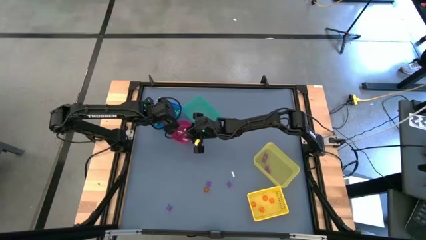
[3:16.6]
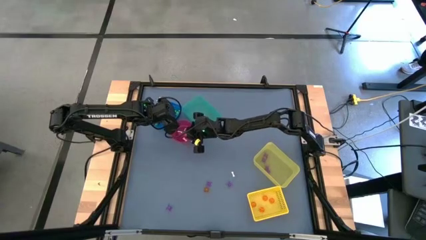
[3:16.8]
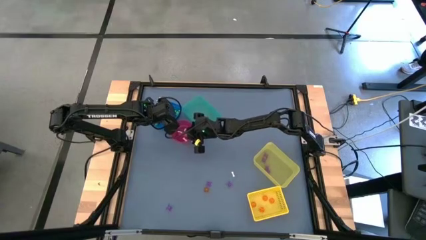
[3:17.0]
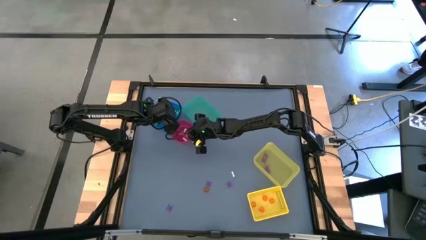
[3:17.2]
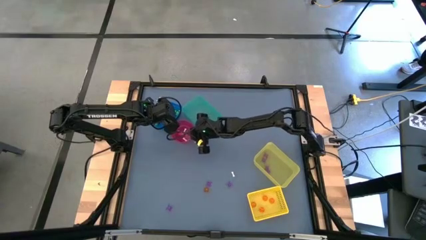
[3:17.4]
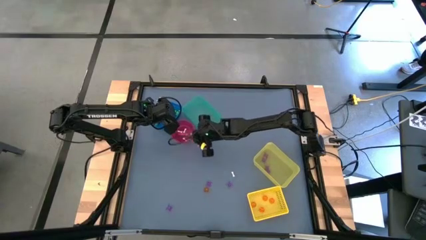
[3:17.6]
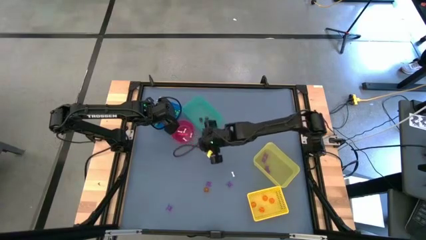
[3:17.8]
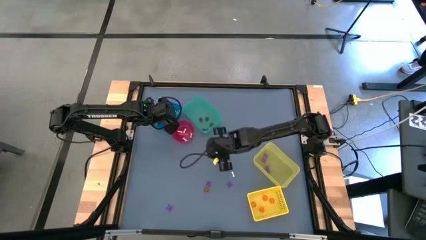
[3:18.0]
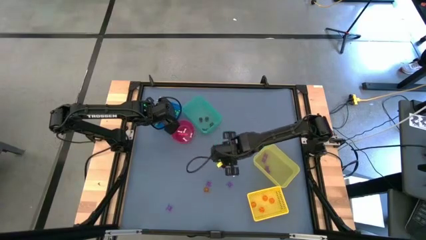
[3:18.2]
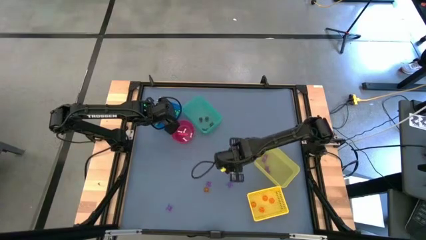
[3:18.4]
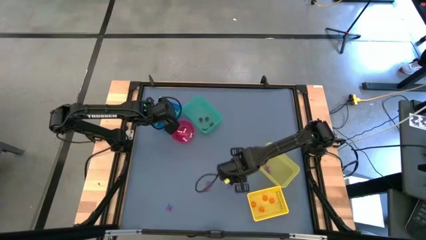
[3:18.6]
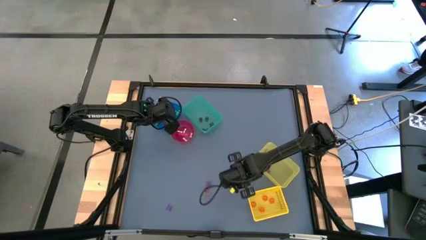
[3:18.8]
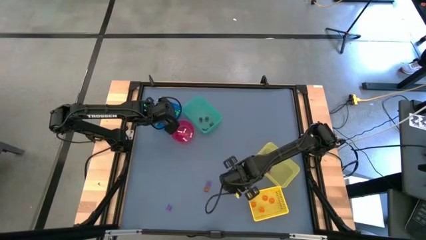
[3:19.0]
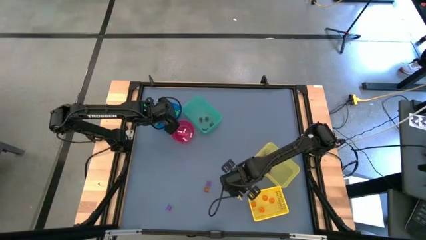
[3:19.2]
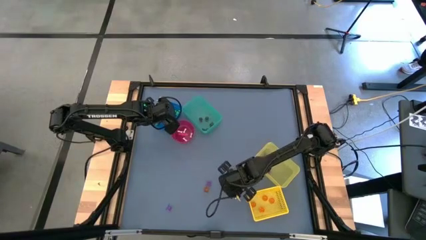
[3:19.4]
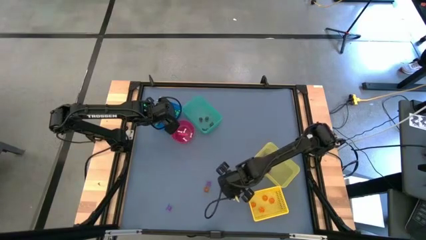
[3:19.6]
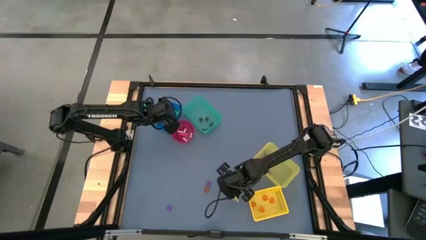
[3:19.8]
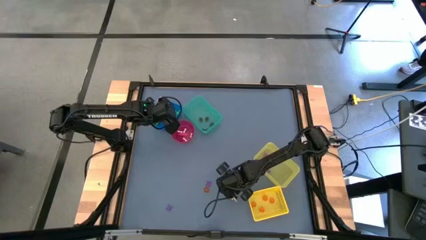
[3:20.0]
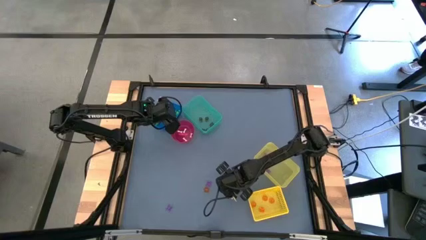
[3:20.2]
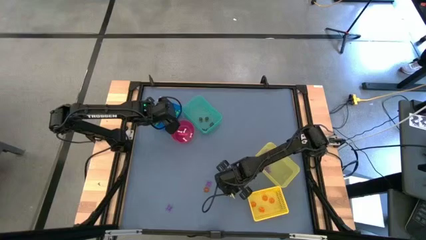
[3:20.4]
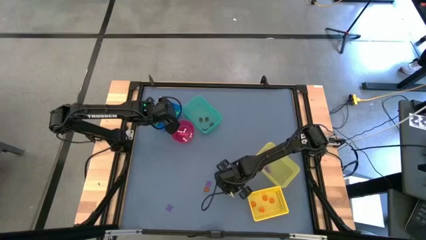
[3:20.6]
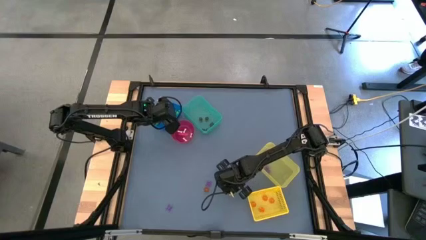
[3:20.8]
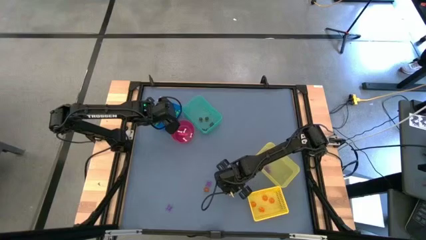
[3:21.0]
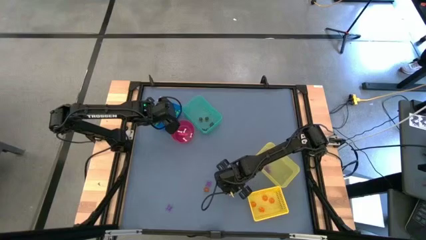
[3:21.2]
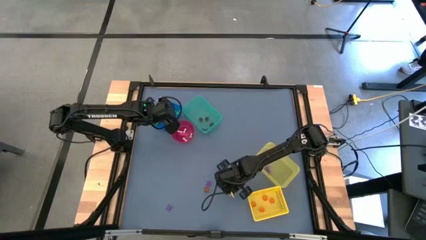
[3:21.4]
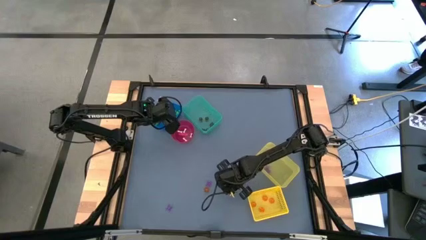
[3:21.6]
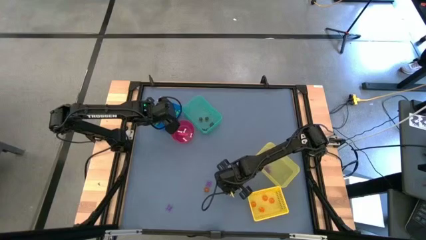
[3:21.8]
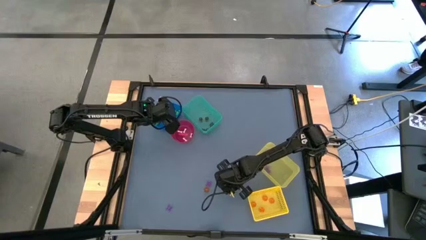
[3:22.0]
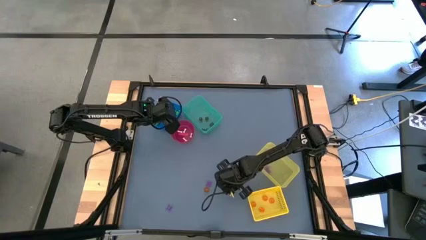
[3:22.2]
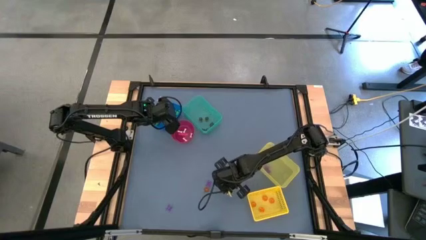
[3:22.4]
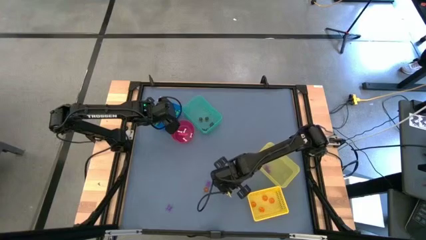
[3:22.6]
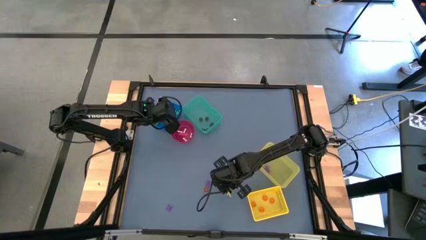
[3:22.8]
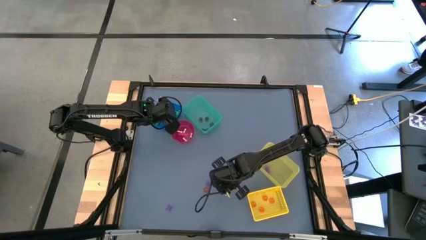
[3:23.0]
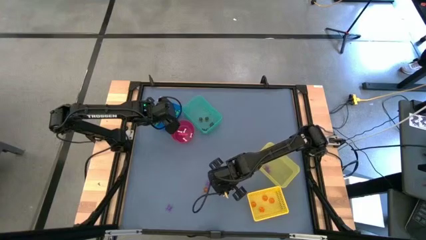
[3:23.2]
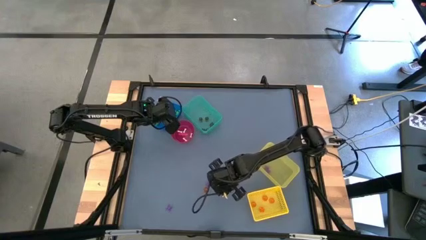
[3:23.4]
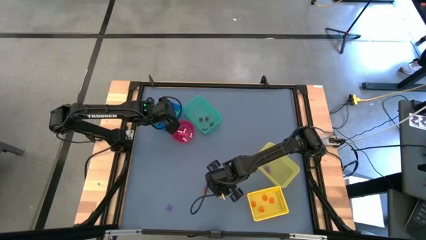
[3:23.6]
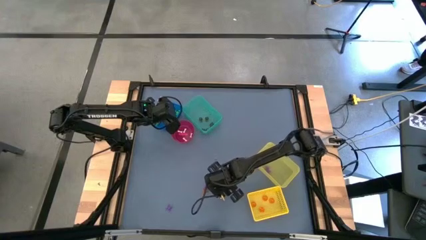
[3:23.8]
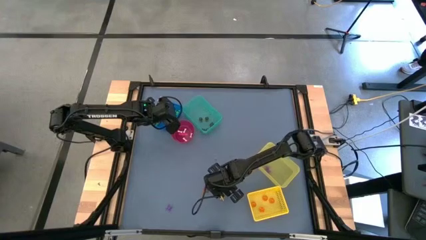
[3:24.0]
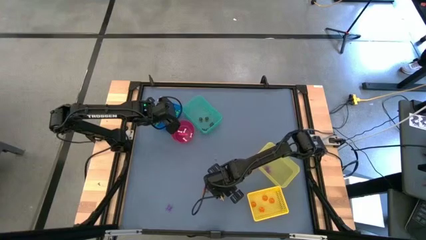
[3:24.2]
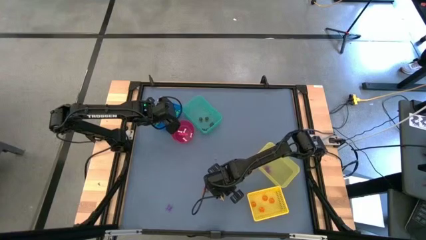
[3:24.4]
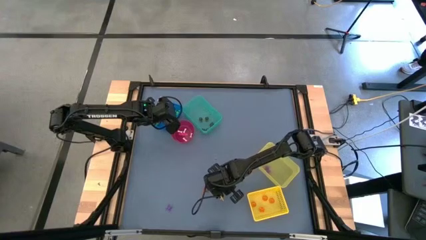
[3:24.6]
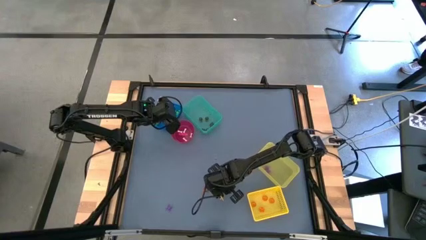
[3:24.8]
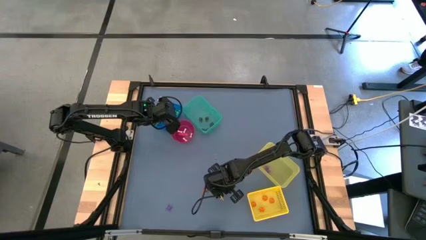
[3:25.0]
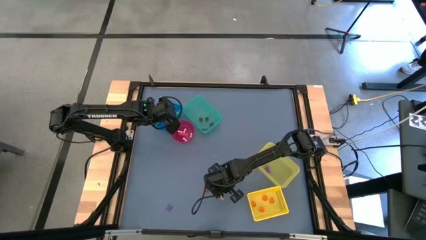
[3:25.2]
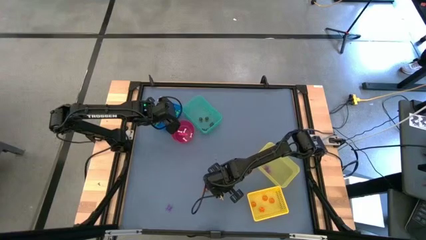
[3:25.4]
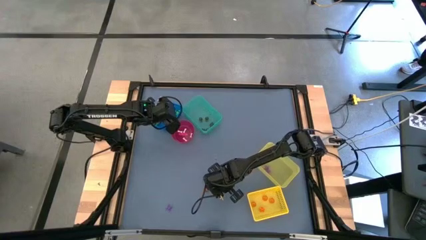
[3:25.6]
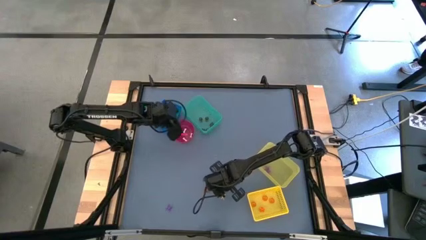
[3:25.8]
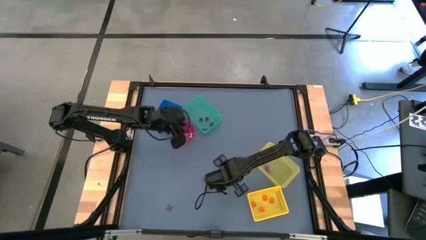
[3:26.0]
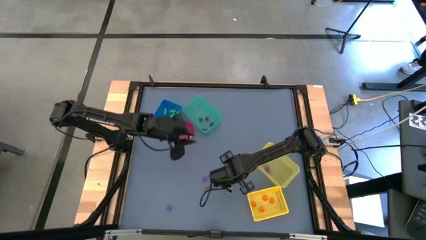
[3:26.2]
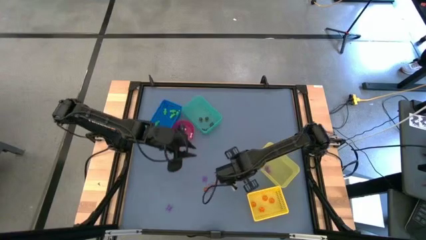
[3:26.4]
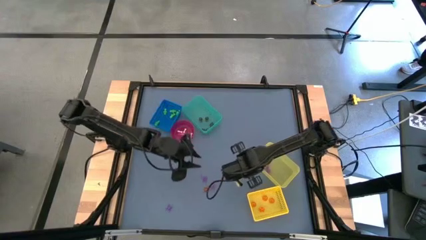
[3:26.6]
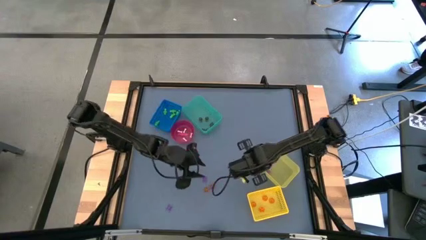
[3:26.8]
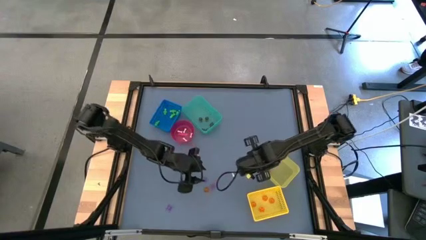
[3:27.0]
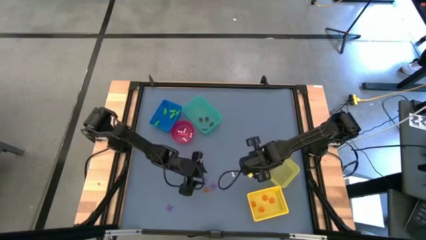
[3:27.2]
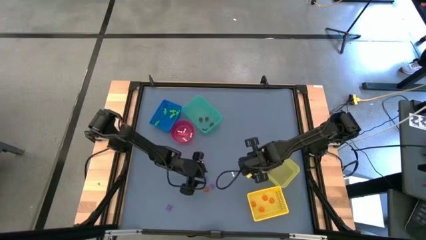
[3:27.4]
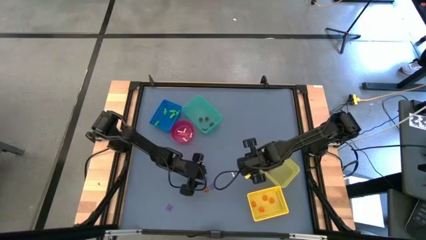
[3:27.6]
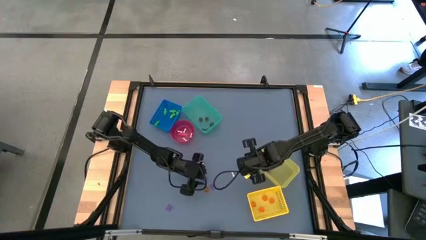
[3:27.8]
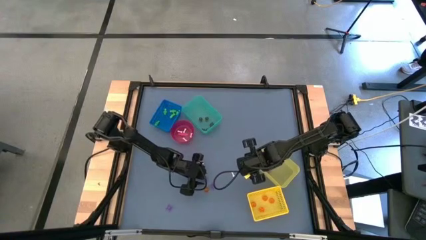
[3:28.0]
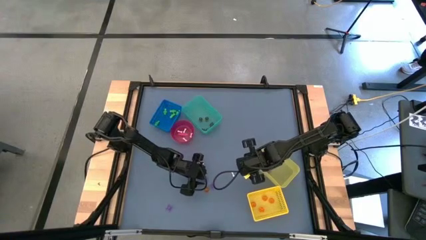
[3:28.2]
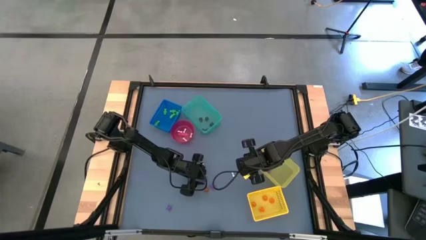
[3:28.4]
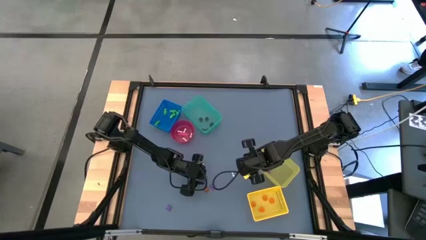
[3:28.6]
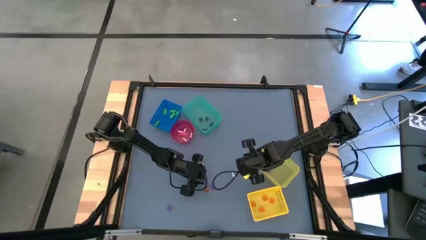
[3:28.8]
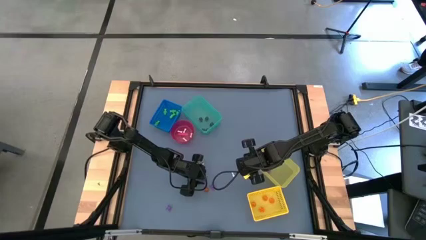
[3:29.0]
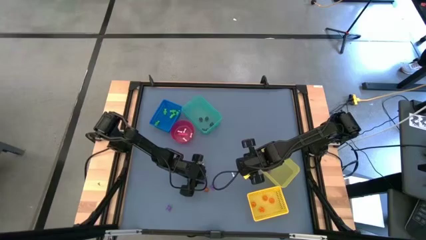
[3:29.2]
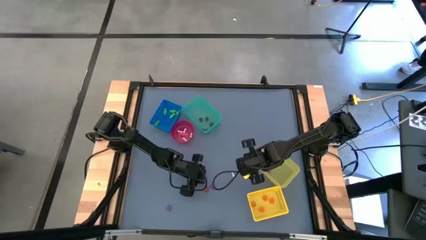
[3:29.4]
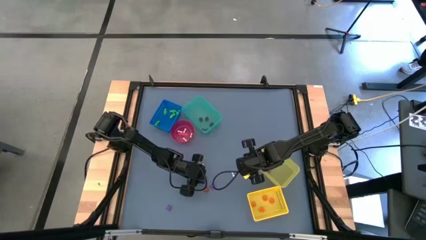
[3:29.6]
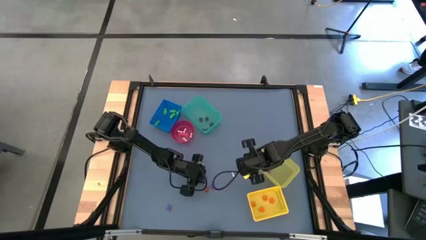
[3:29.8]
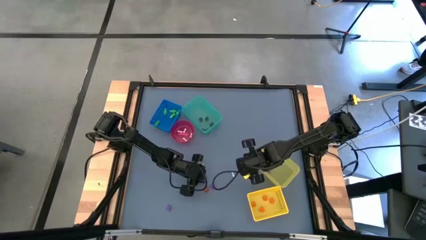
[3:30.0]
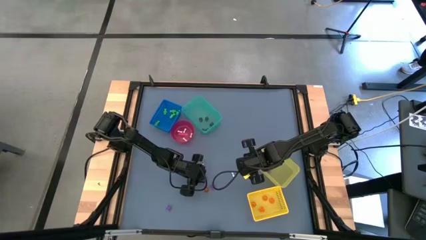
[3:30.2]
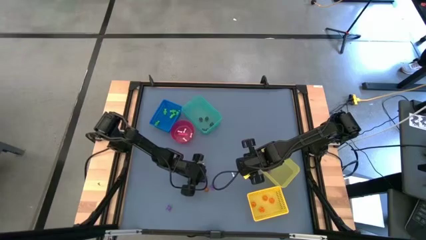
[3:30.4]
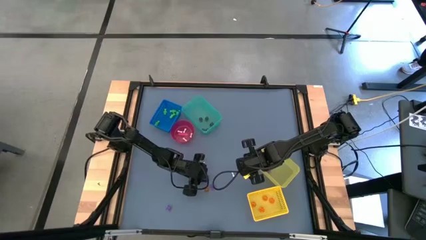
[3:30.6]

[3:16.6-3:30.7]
Task: Sort Halloween decoration
Put the purple spider toy into the yellow bin

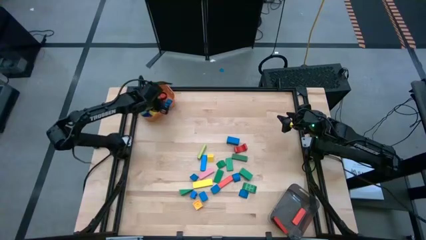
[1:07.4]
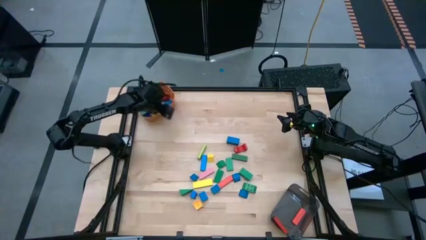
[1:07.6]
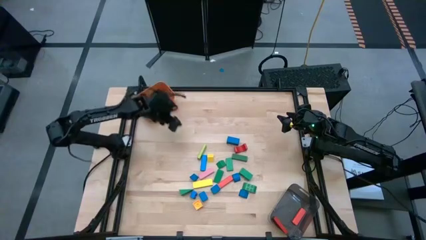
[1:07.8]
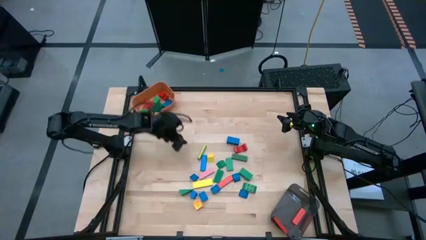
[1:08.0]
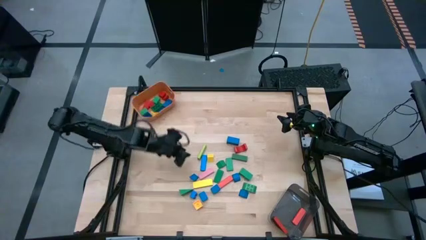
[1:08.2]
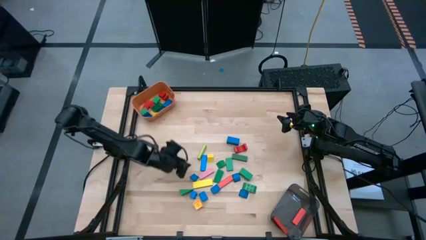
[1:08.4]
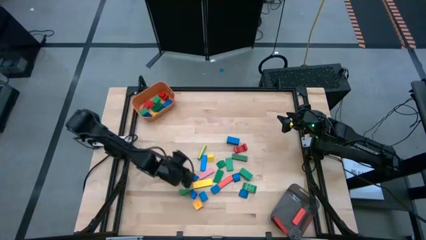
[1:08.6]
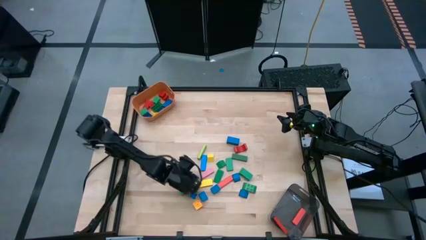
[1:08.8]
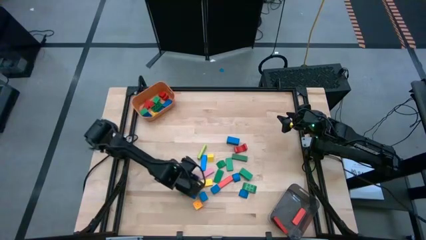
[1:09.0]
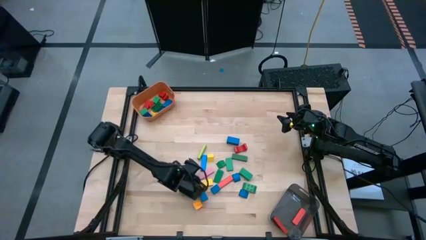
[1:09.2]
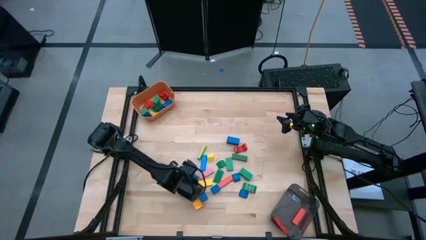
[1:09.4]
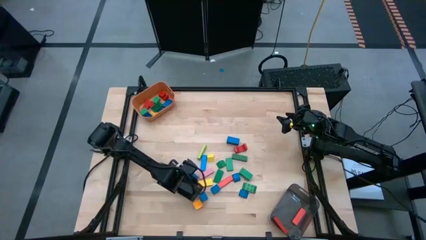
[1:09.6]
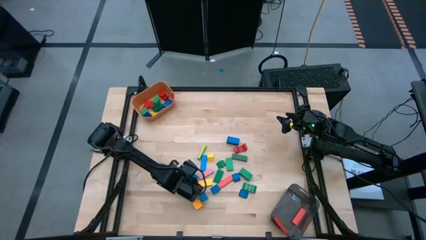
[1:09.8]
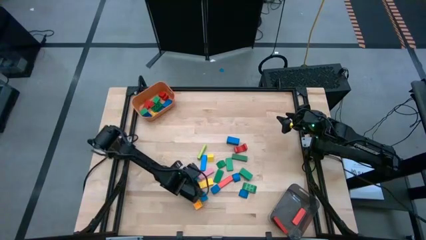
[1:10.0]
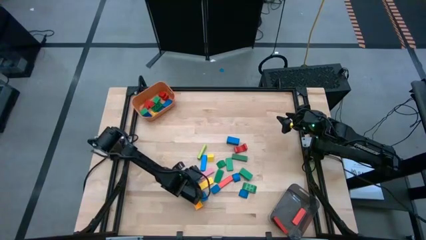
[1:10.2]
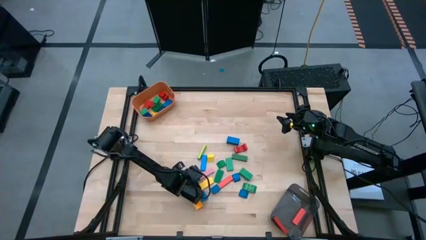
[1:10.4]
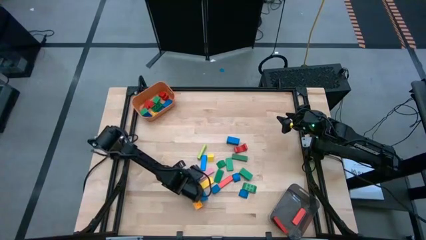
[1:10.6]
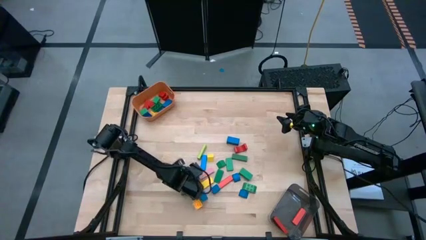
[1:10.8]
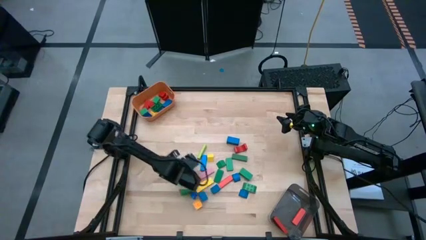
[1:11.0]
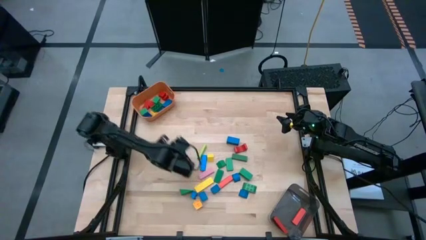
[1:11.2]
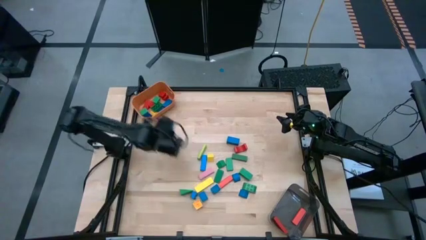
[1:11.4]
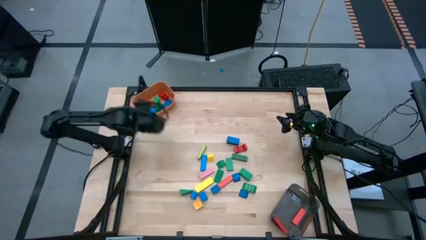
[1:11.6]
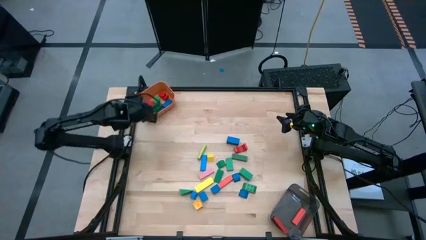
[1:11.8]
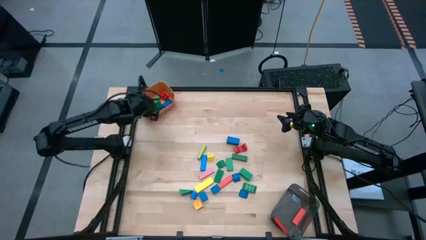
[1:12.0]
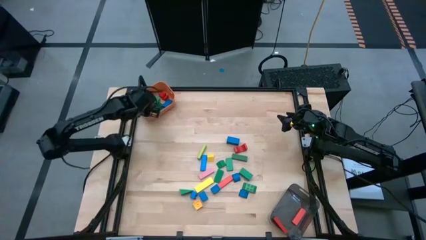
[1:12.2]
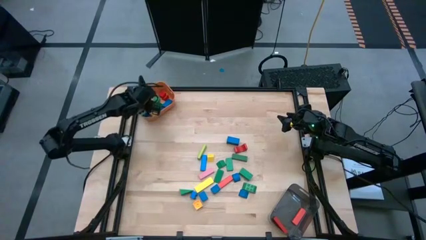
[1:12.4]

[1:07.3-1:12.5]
Task: Sort blocks by size
Put the small blue block into the orange bin
